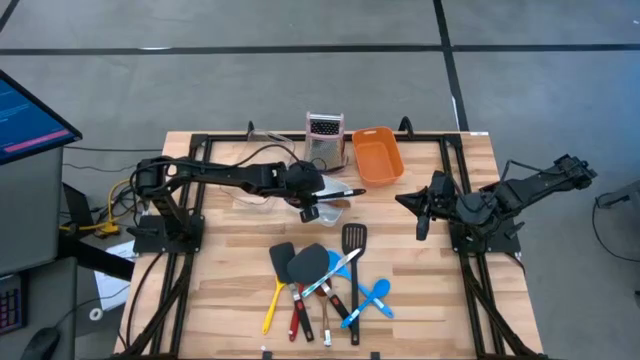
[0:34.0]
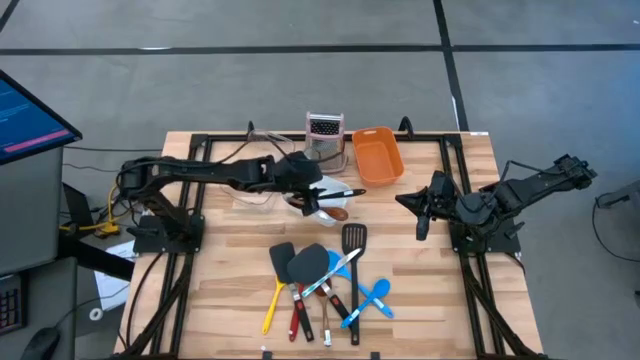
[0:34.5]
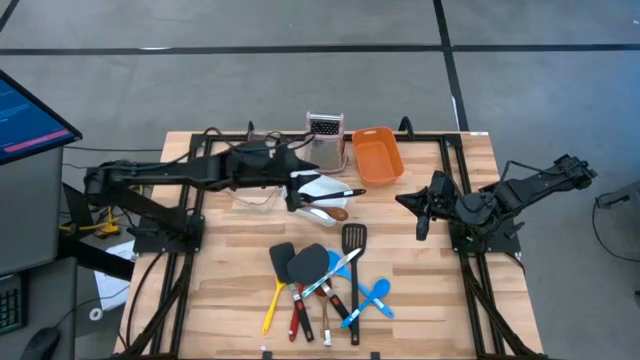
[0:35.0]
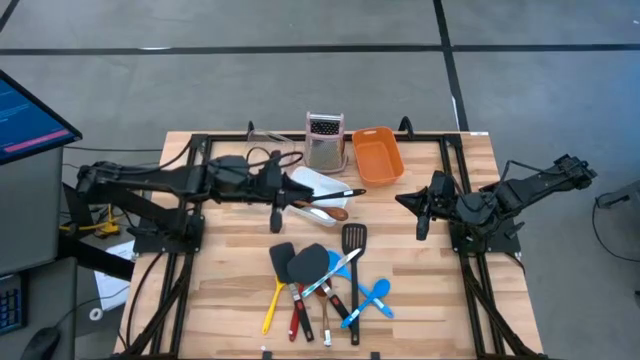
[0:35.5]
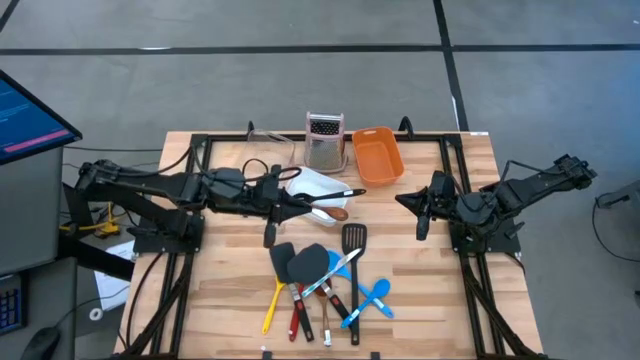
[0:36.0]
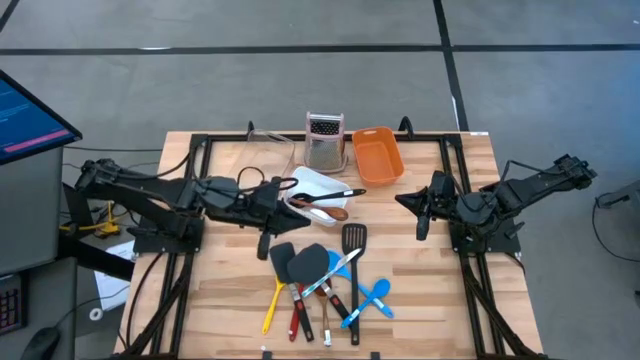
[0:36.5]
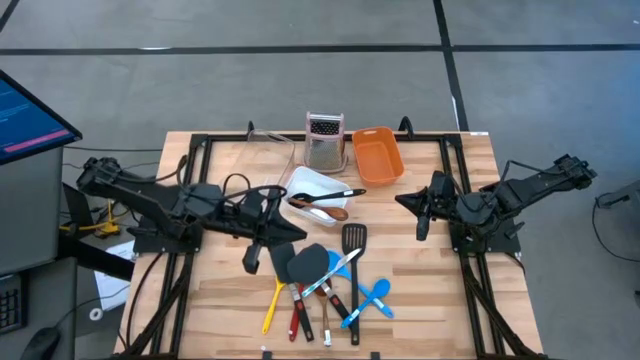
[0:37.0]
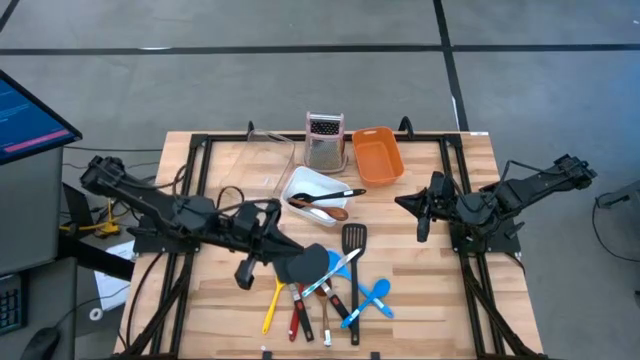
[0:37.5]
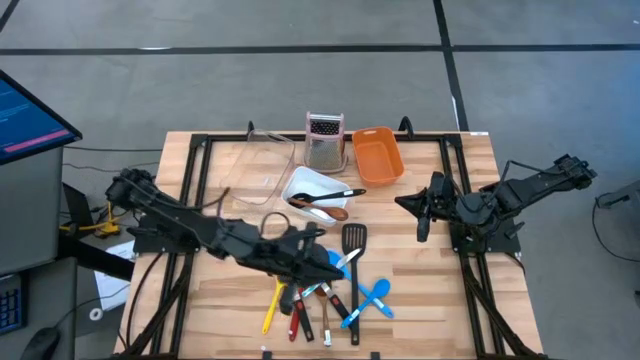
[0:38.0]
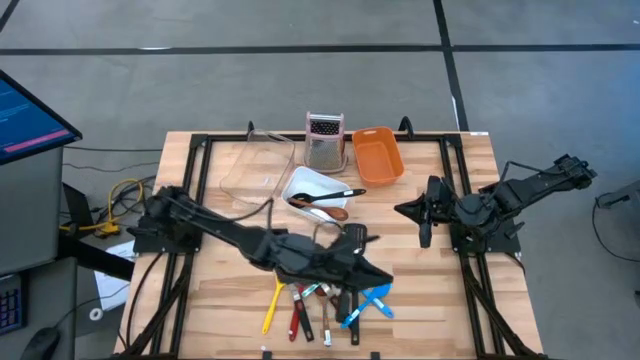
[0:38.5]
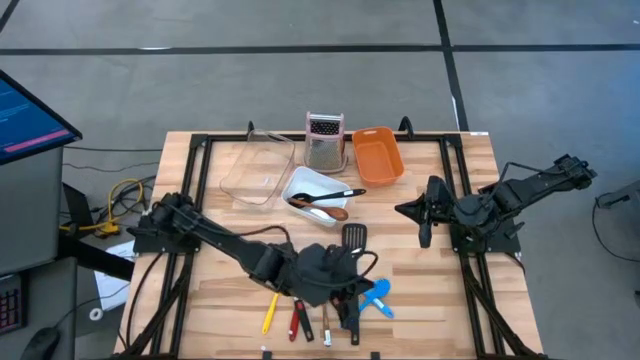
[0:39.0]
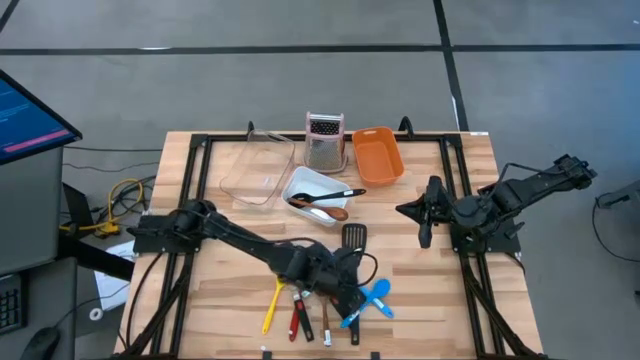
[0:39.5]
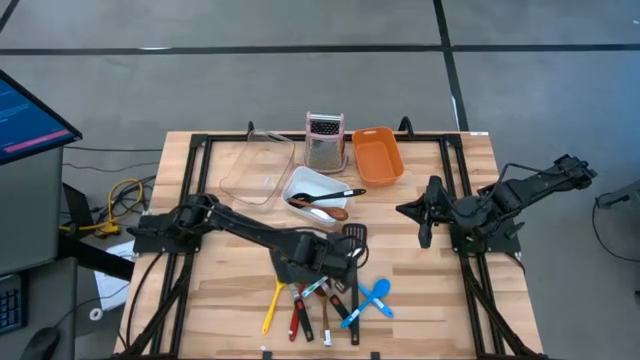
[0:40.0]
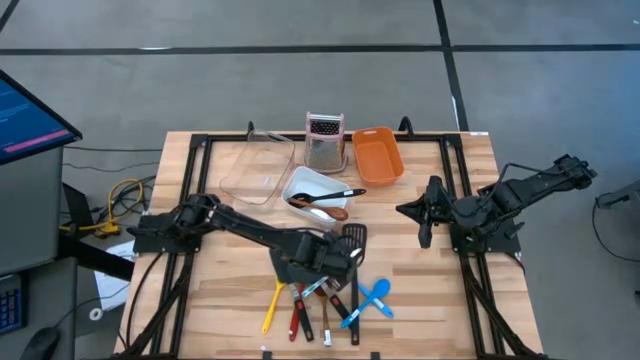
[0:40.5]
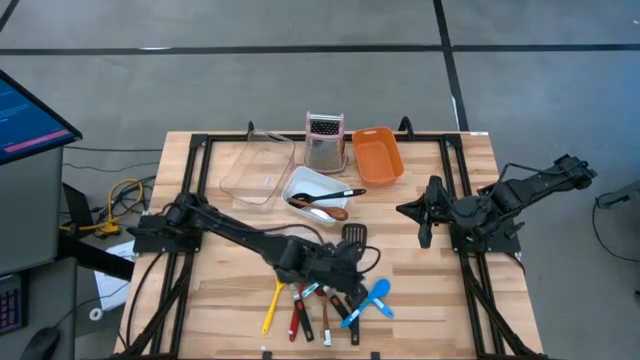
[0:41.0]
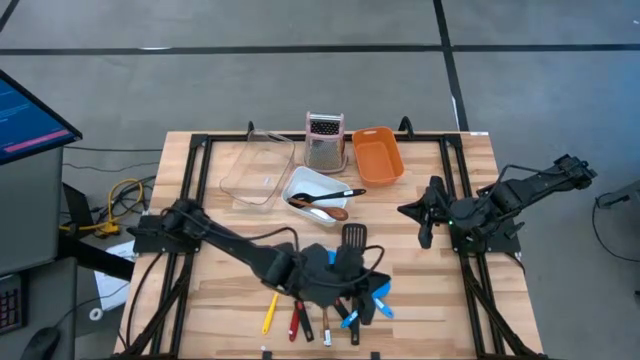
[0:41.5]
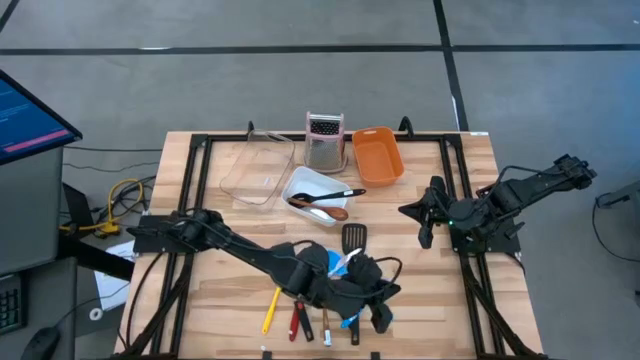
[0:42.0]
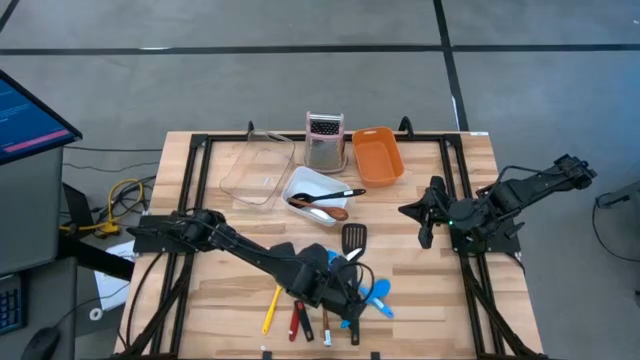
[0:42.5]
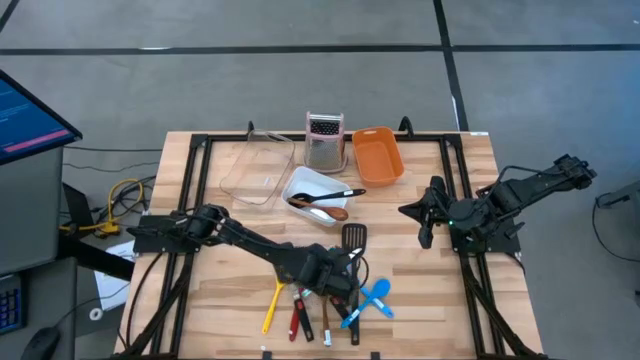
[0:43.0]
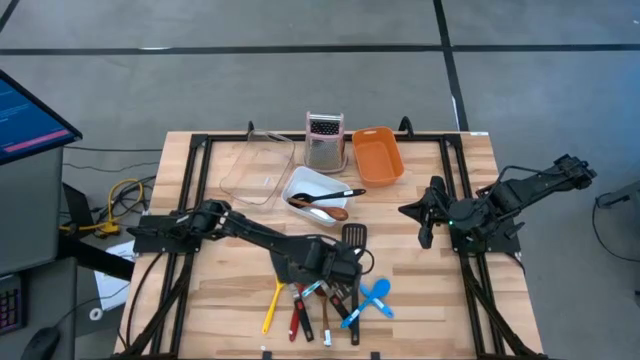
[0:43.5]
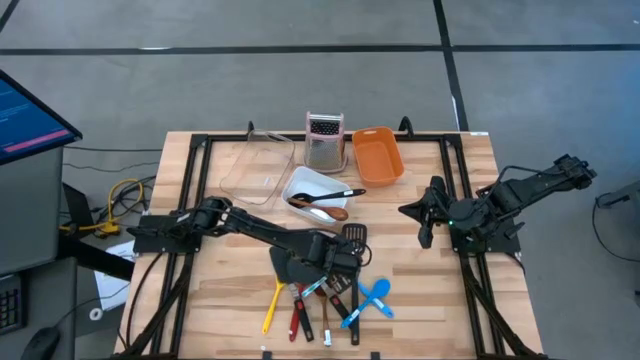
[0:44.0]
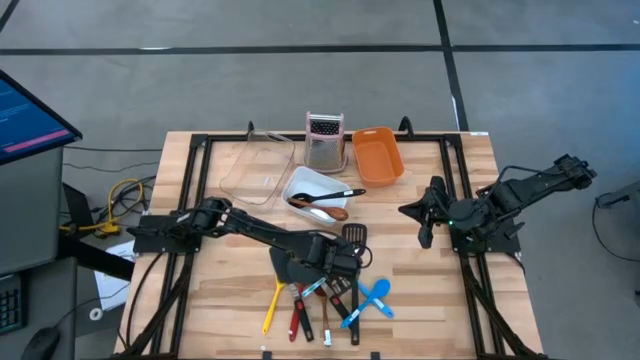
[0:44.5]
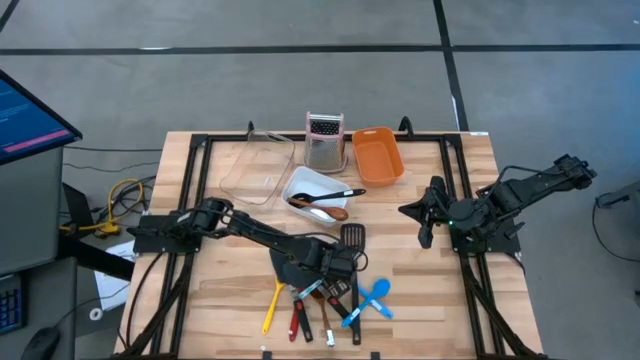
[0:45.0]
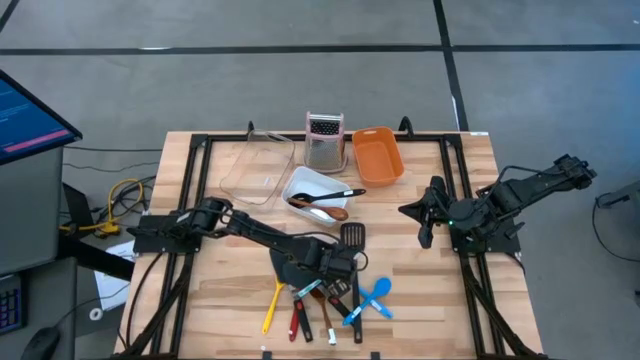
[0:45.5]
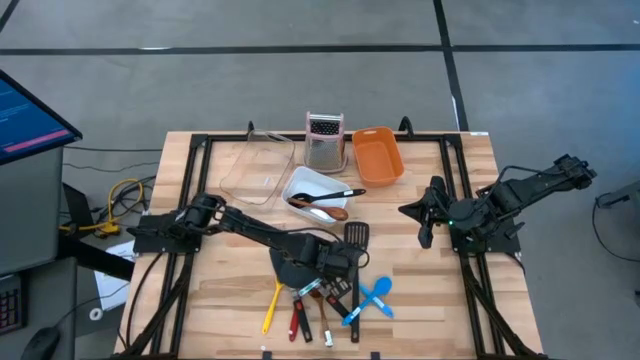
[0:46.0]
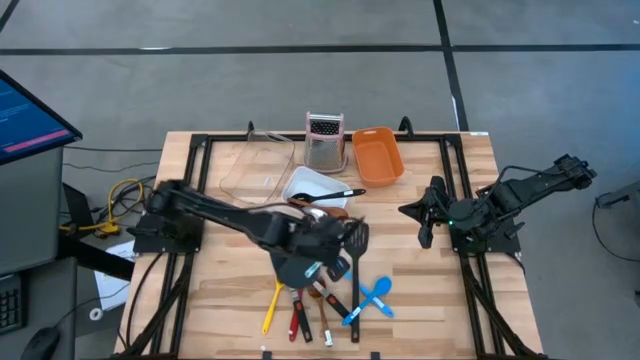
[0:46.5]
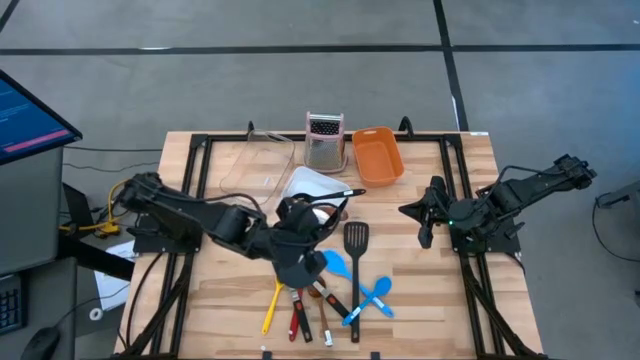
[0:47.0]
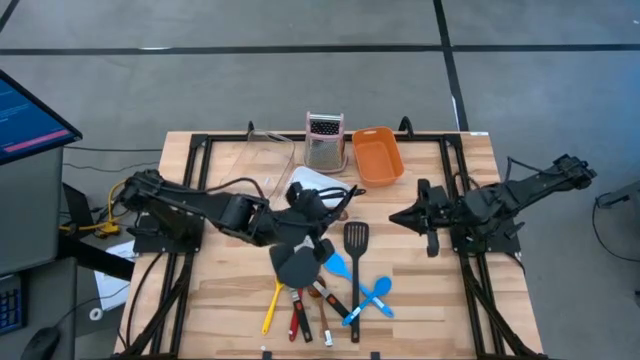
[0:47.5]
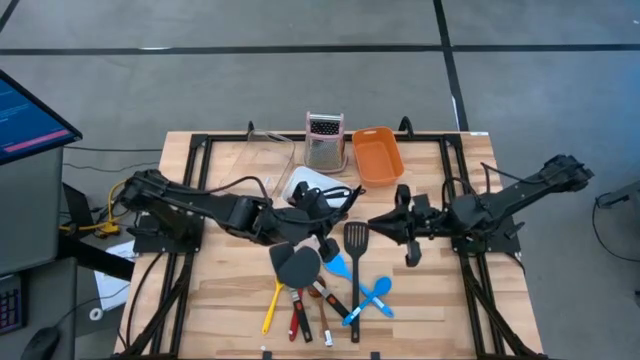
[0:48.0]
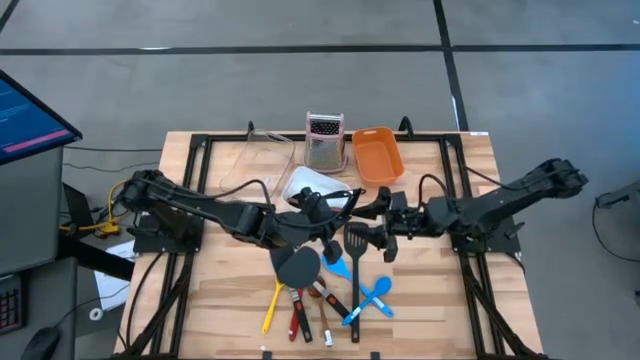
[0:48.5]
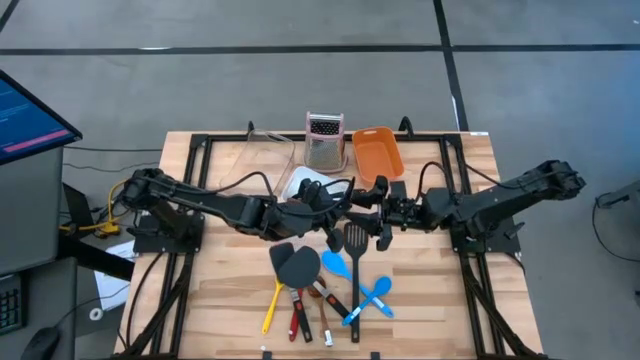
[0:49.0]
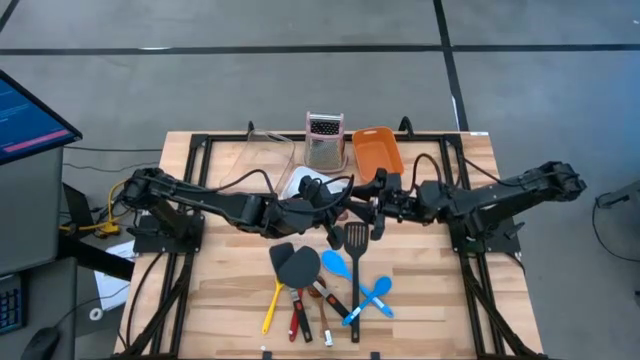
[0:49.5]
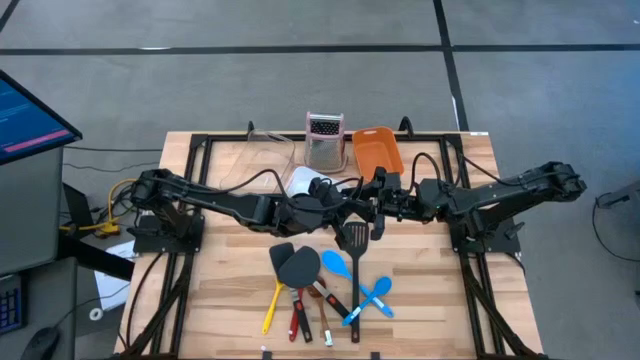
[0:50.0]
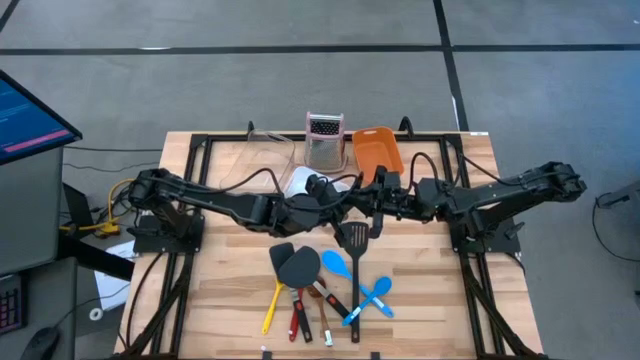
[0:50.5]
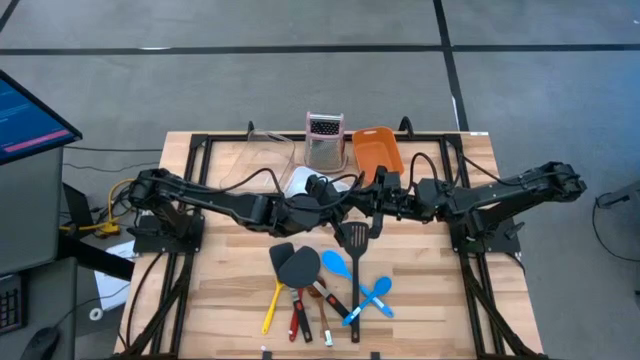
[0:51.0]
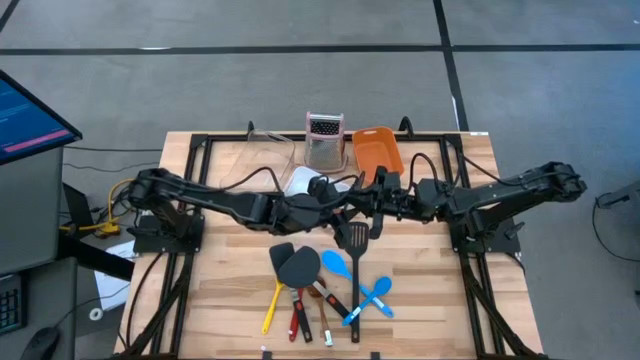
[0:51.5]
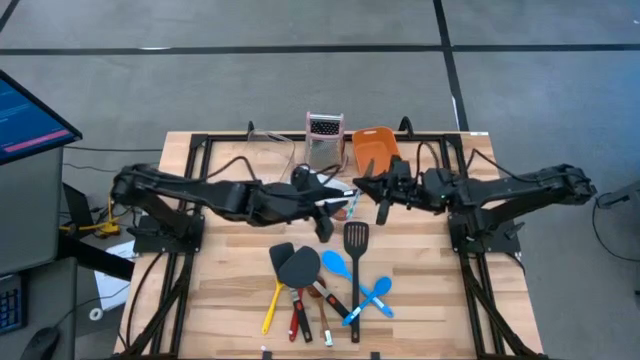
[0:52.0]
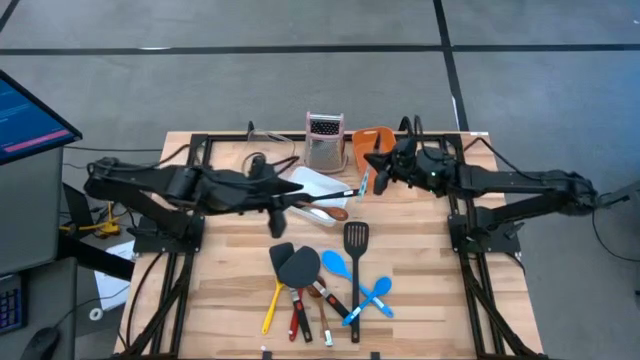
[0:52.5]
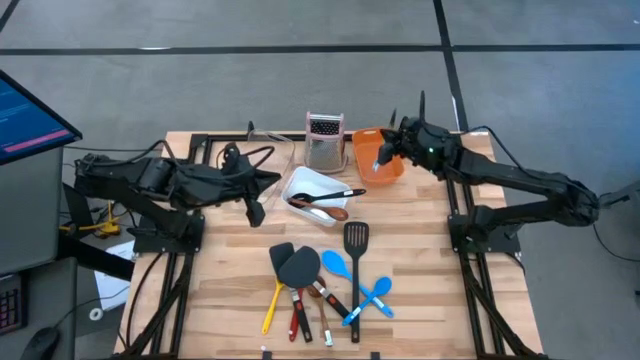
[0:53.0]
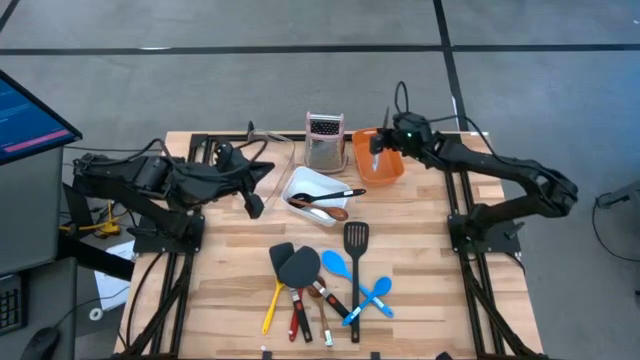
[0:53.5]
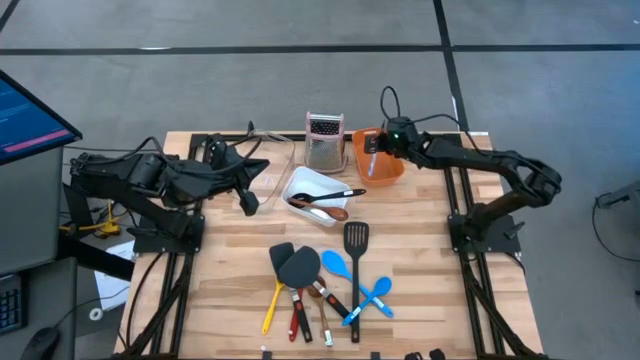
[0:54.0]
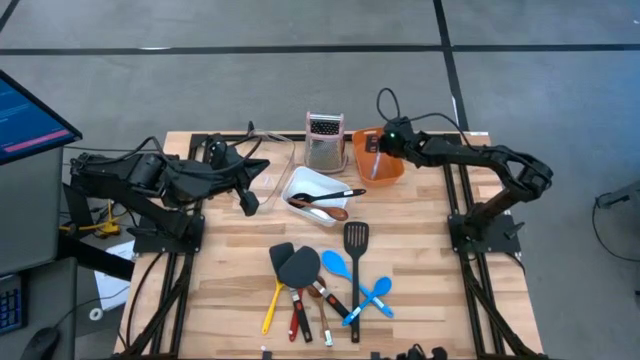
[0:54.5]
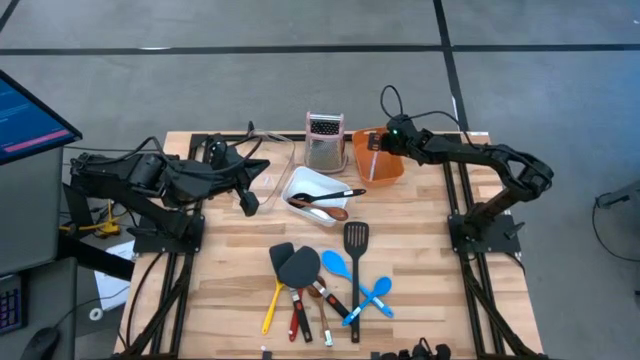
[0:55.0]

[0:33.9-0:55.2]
Task: Pick & Place Kitchen Items
Put the blue table knife into the orange bin
